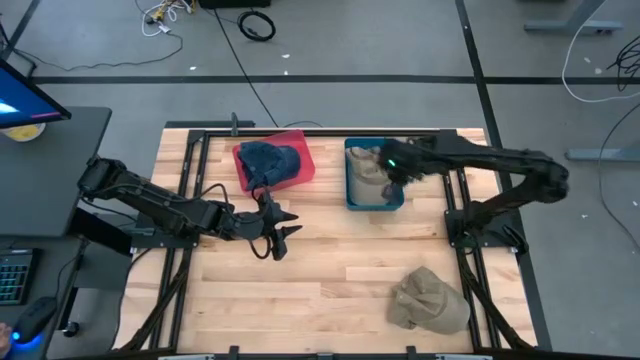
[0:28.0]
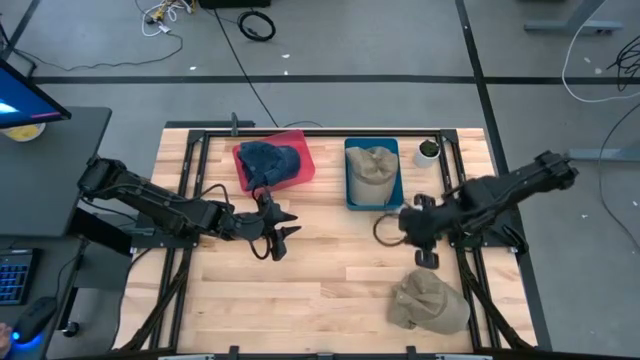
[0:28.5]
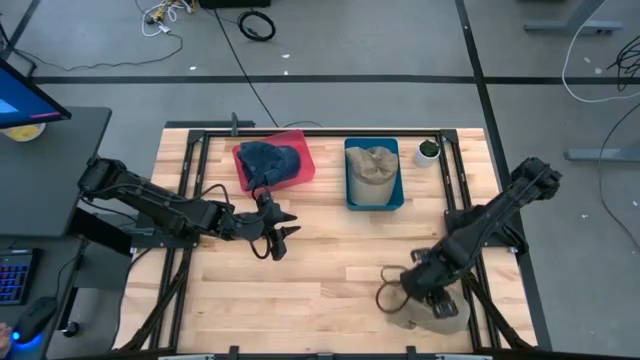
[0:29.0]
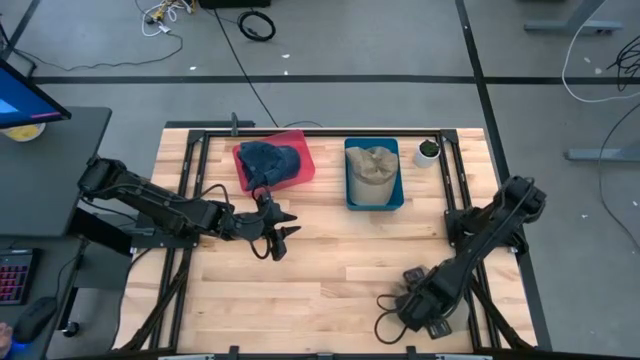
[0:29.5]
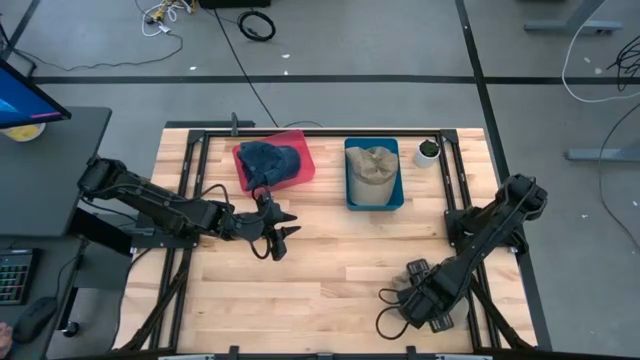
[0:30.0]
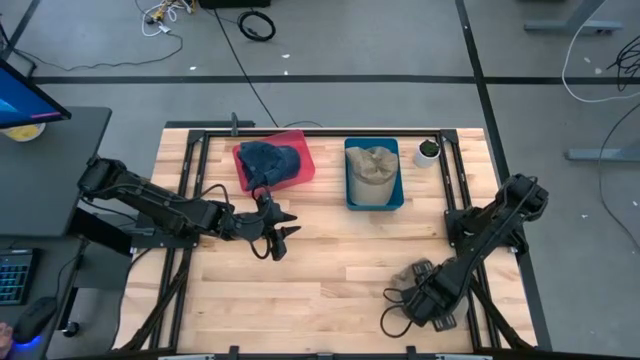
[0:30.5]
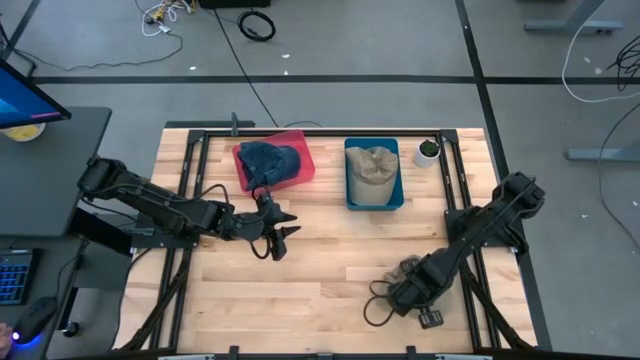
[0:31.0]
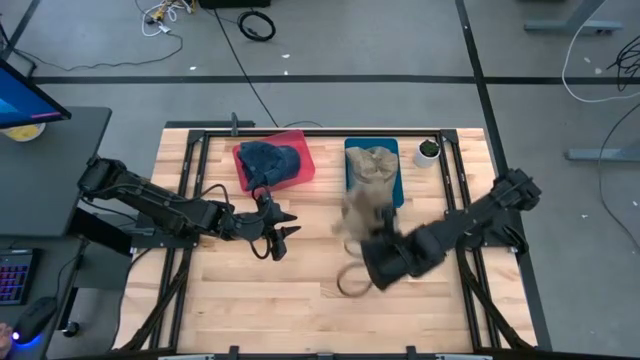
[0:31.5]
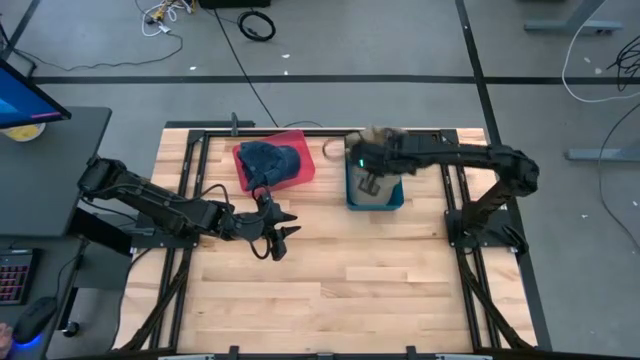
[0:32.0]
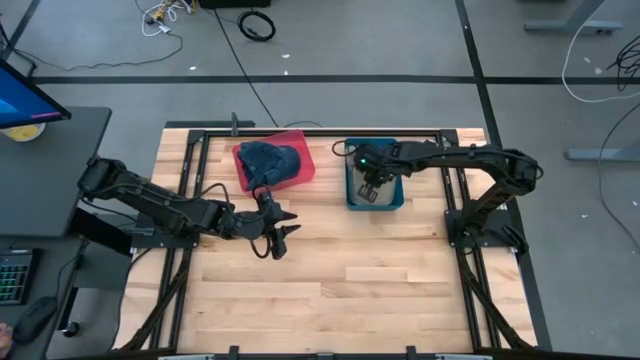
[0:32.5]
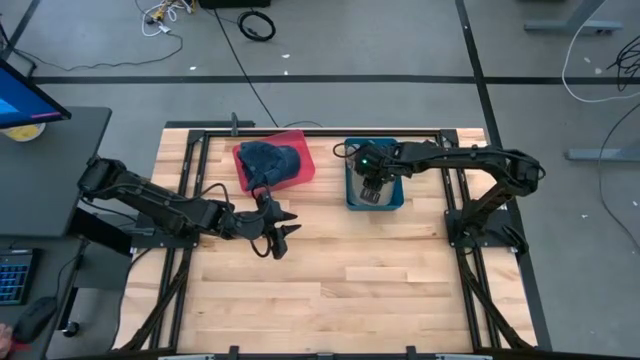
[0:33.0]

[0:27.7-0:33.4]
Task: Pick & Place hat
Put the brown cap into the blue bin

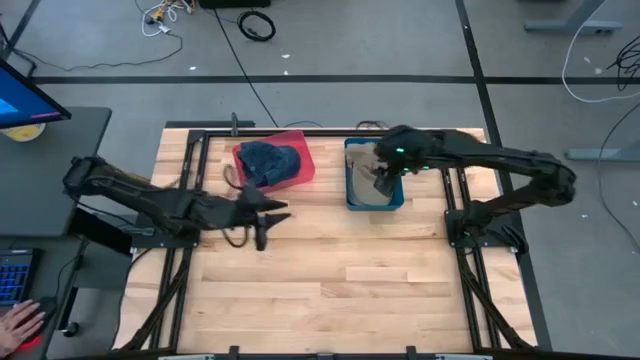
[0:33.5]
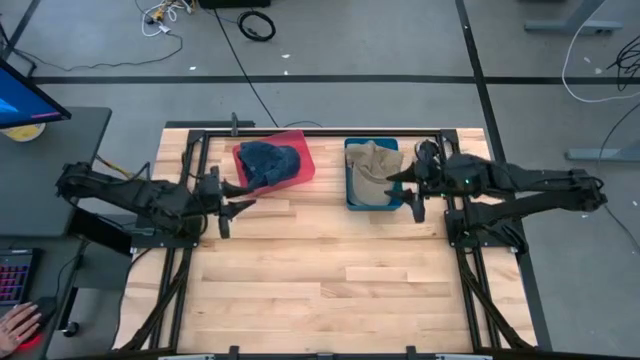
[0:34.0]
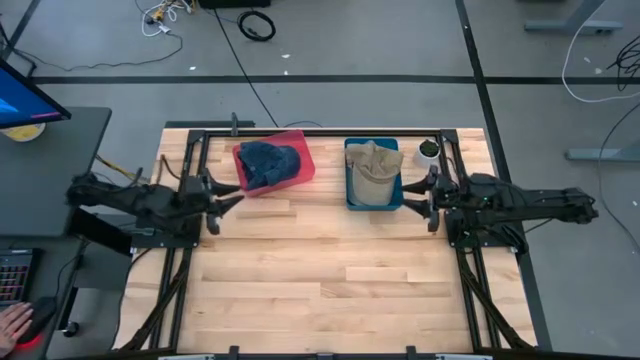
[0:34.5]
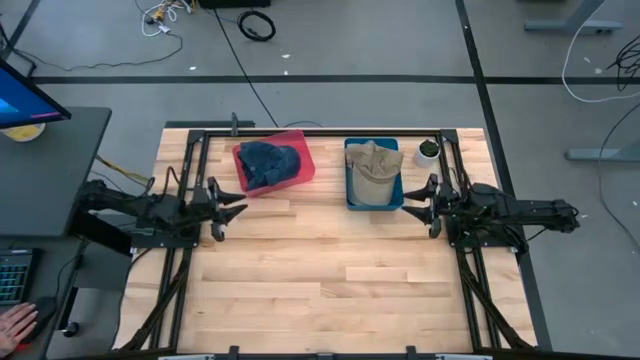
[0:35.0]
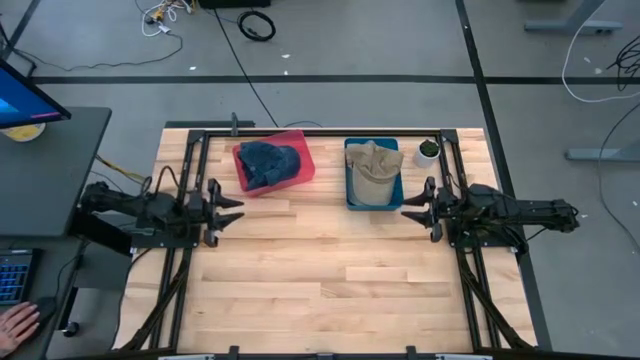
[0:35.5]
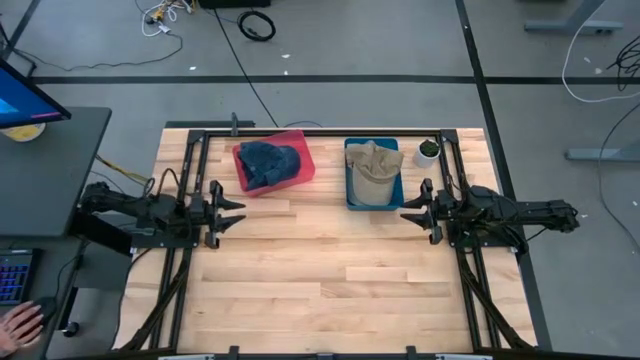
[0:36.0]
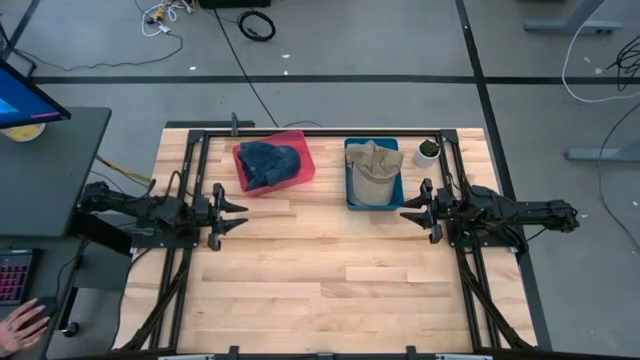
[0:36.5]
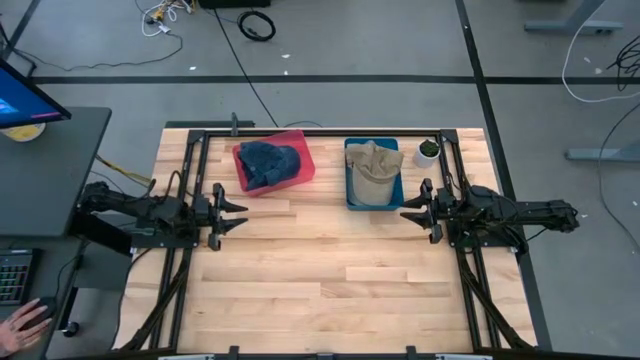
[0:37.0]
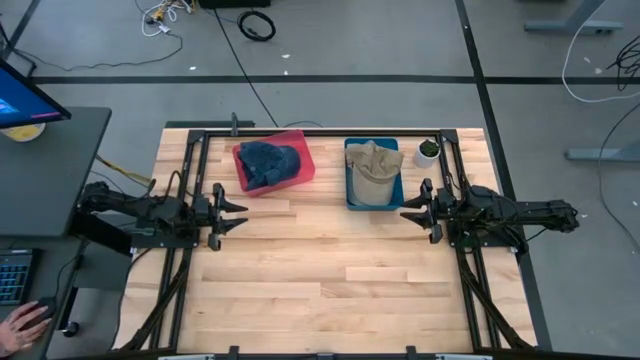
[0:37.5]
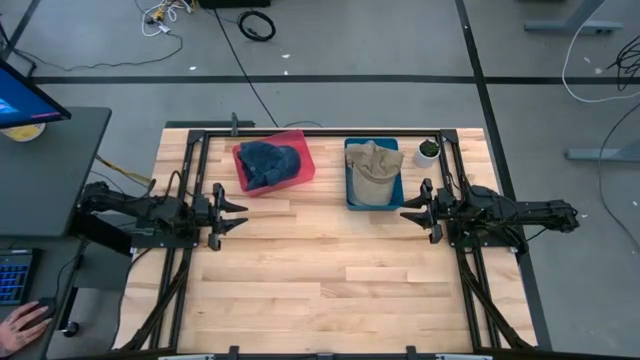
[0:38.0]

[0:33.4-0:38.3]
Return to Home Position

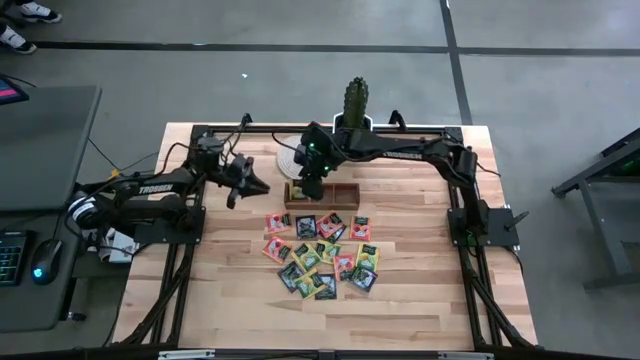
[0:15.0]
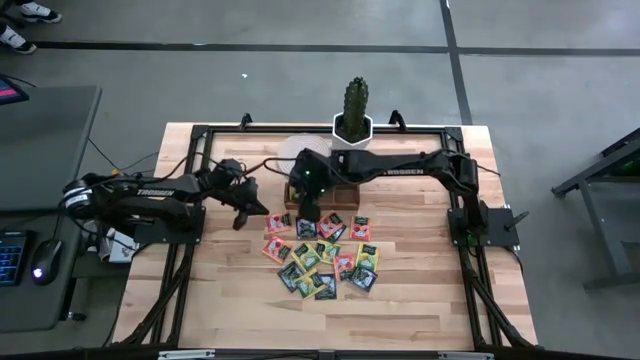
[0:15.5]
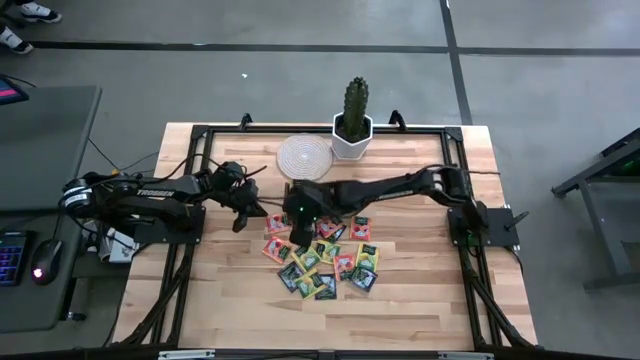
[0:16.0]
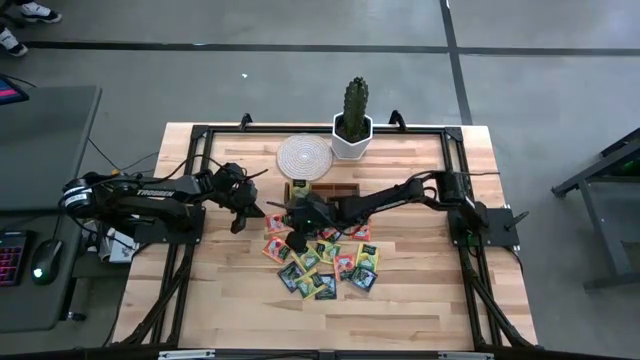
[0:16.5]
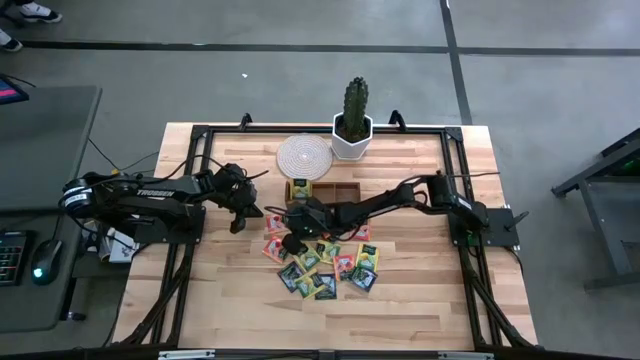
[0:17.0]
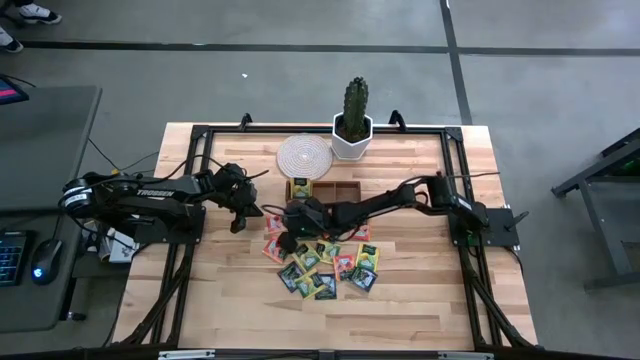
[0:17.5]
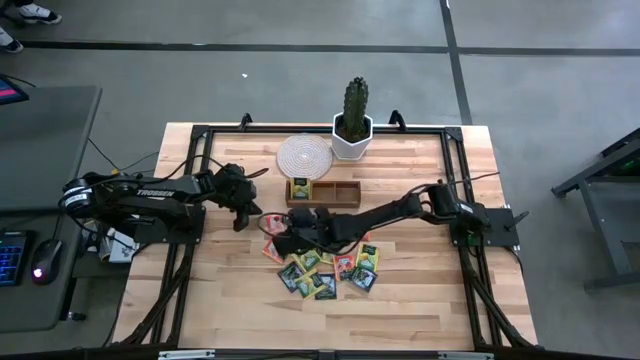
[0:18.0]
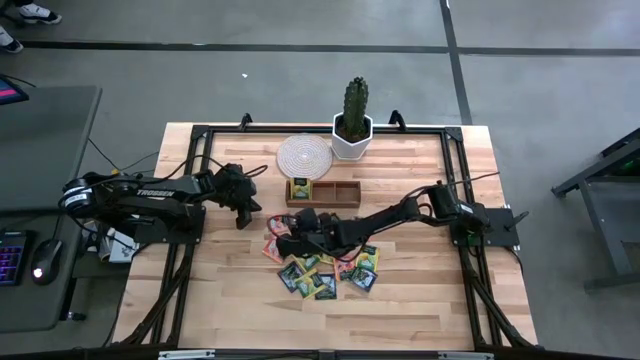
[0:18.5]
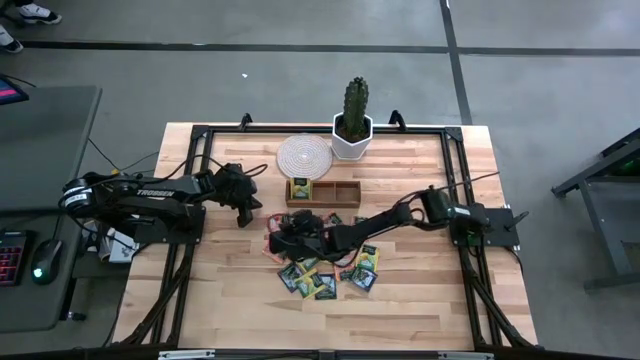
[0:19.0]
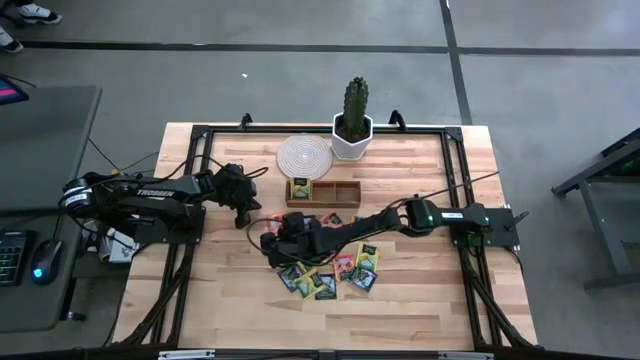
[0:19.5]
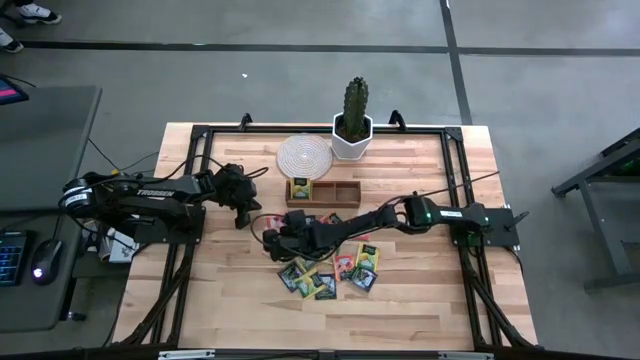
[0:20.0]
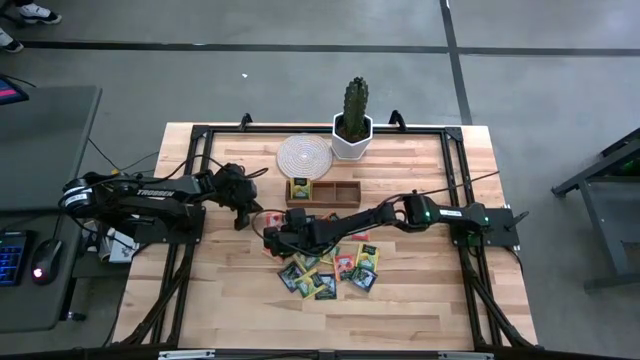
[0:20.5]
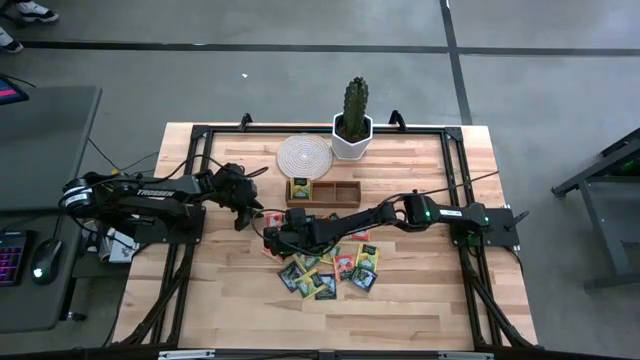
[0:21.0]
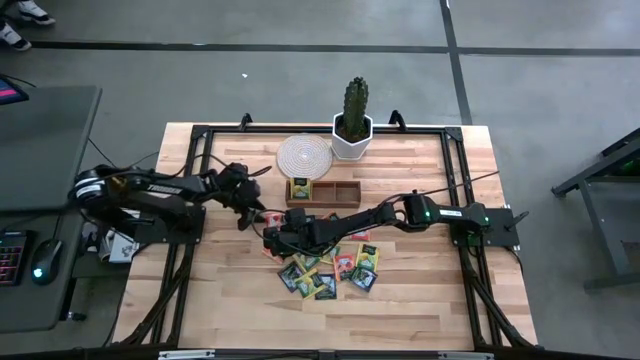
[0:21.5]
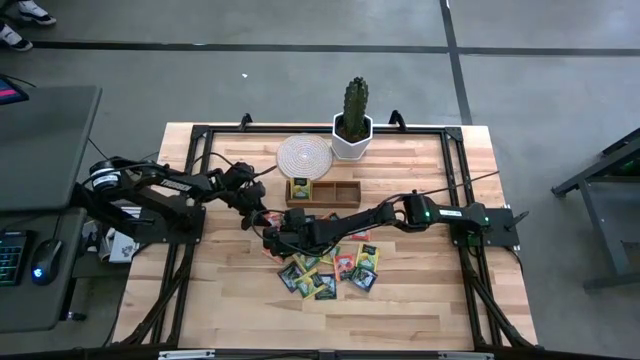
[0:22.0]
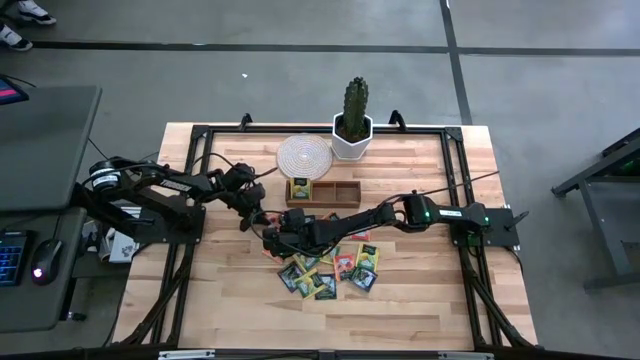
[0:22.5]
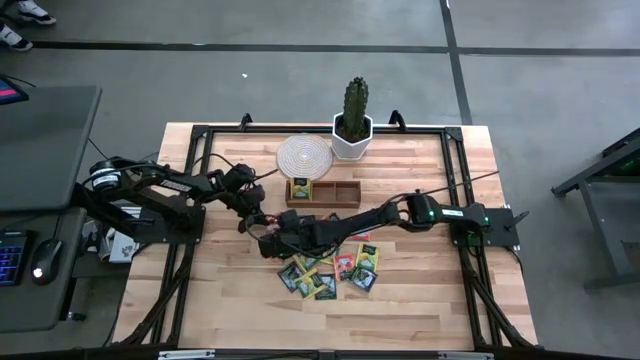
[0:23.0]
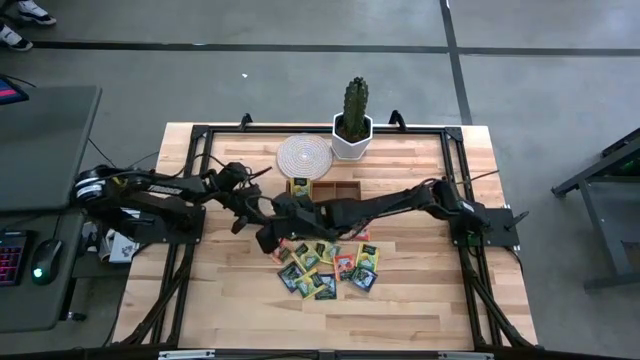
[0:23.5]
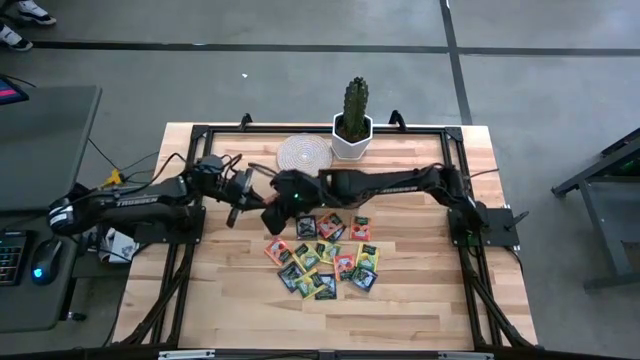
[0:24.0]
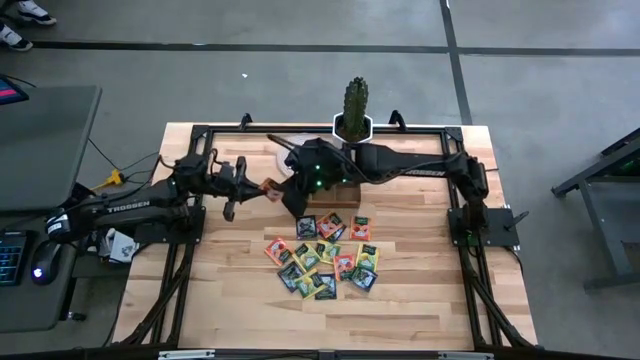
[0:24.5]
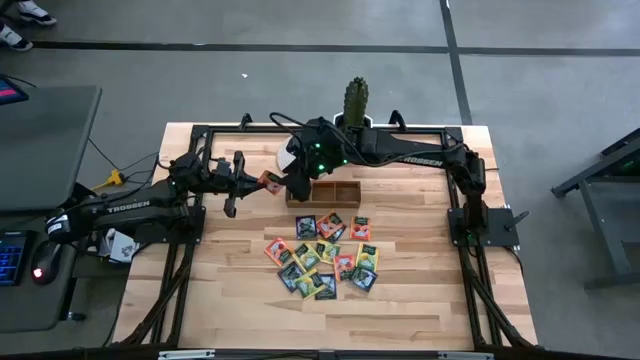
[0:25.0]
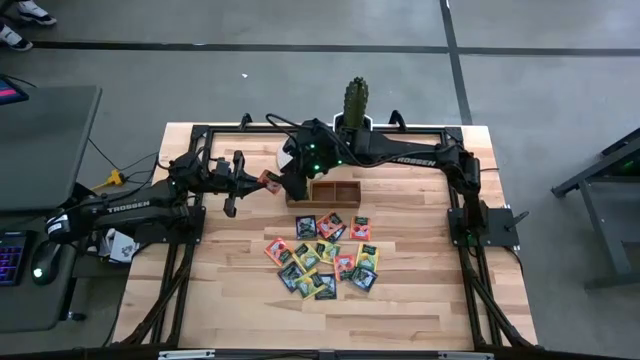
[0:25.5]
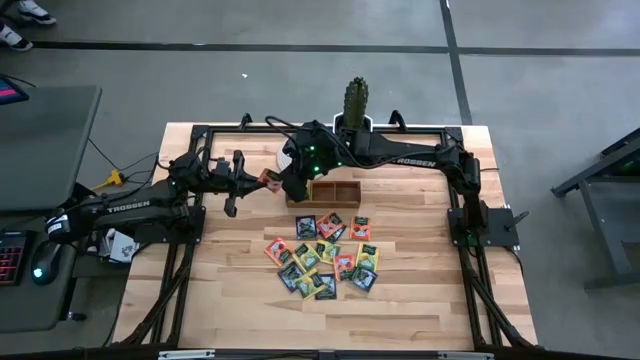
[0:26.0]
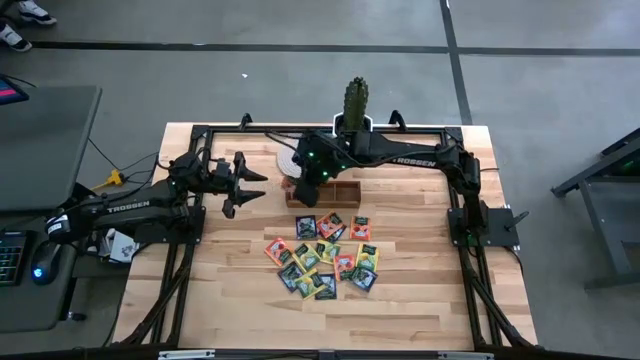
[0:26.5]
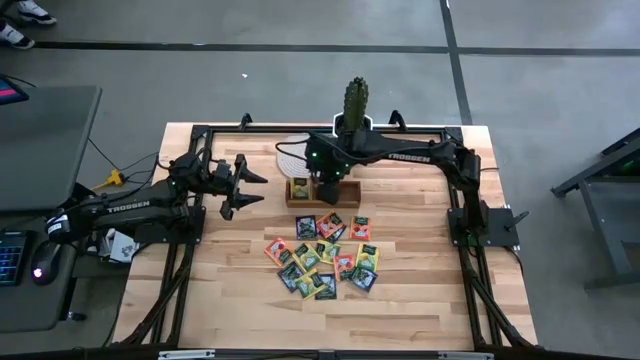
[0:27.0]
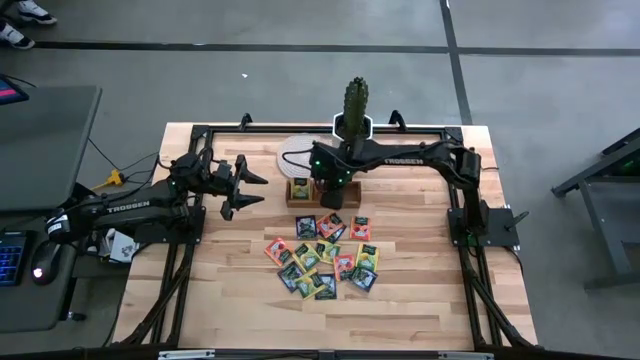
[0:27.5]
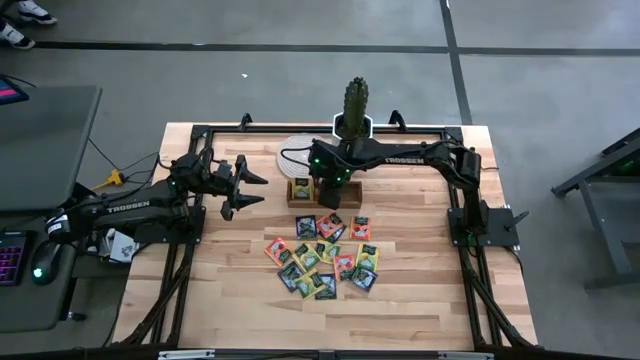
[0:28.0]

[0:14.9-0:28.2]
Task: Pick & Place Tea
Put the orange tea bag into the middle section of the wooden organizer
